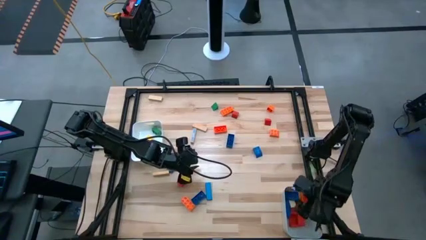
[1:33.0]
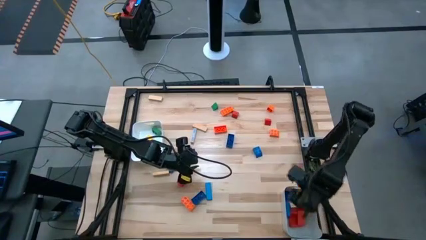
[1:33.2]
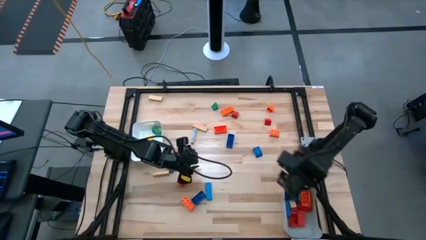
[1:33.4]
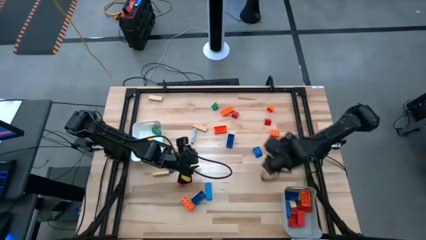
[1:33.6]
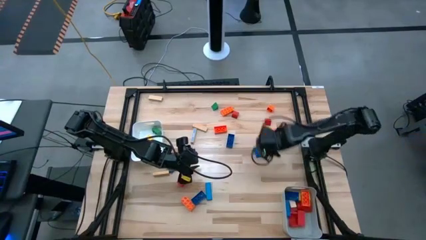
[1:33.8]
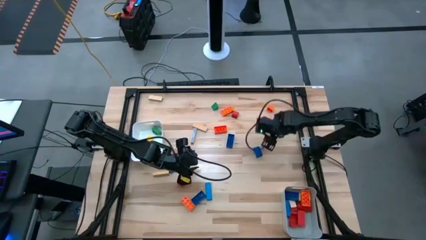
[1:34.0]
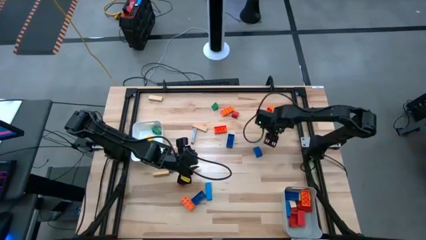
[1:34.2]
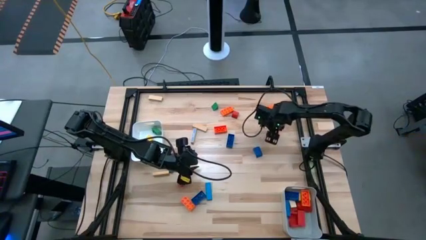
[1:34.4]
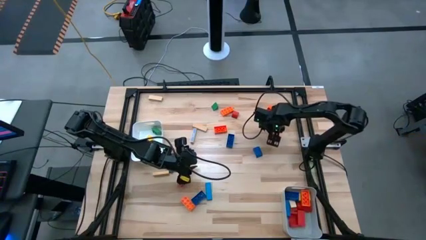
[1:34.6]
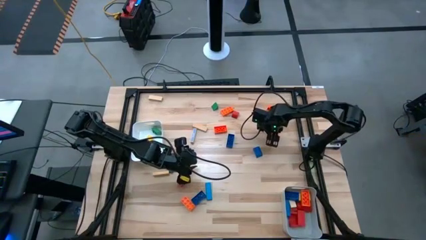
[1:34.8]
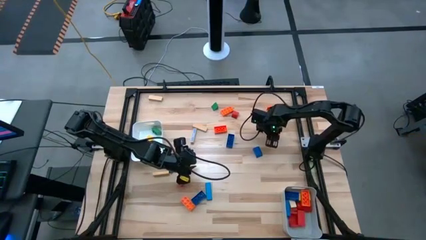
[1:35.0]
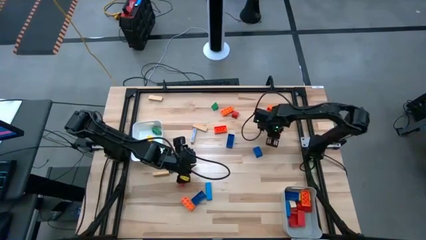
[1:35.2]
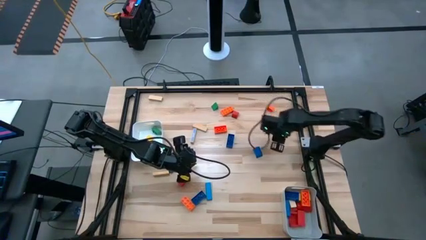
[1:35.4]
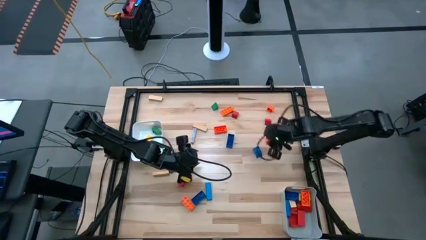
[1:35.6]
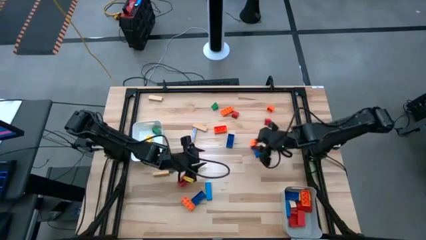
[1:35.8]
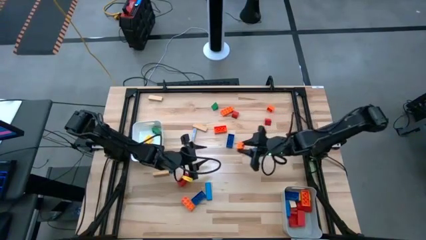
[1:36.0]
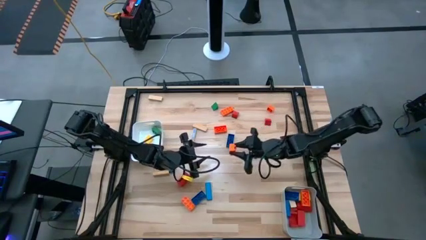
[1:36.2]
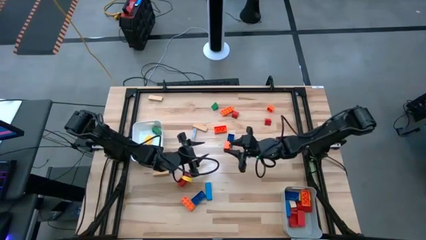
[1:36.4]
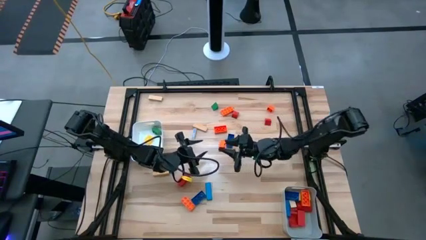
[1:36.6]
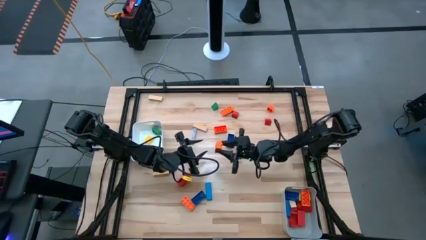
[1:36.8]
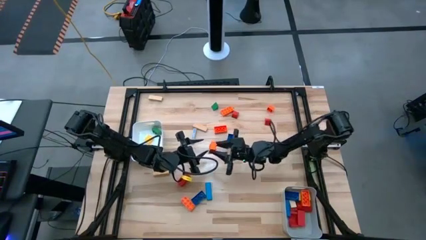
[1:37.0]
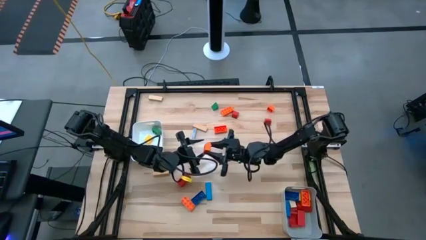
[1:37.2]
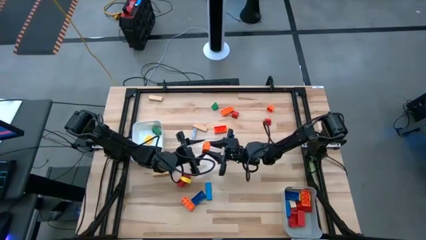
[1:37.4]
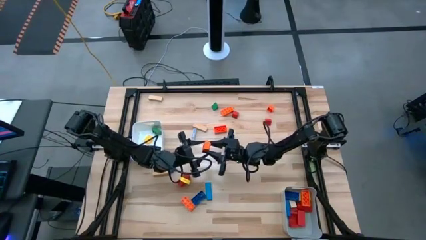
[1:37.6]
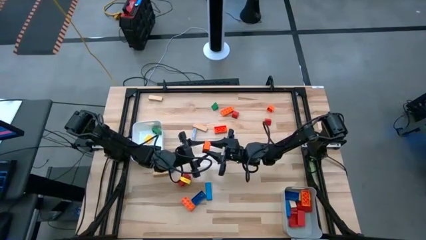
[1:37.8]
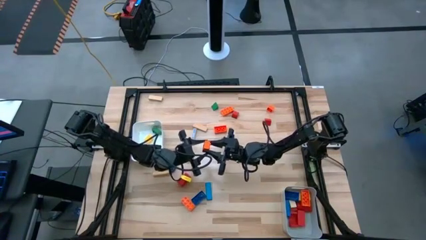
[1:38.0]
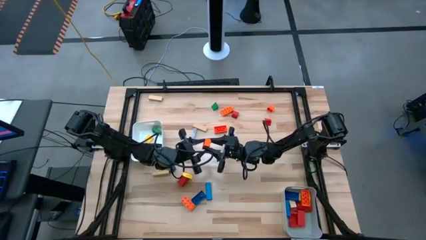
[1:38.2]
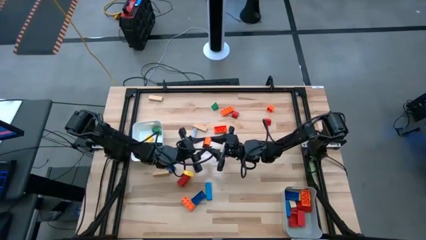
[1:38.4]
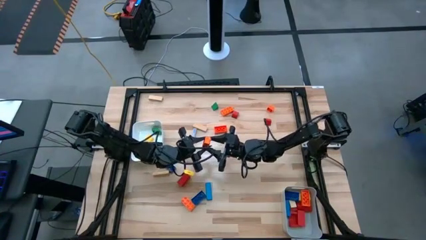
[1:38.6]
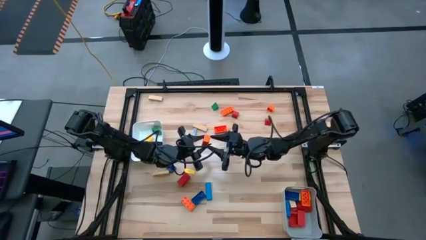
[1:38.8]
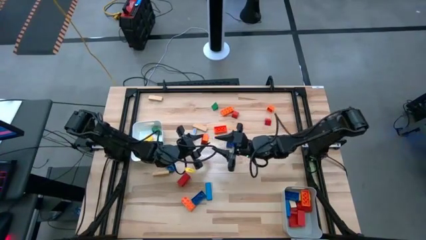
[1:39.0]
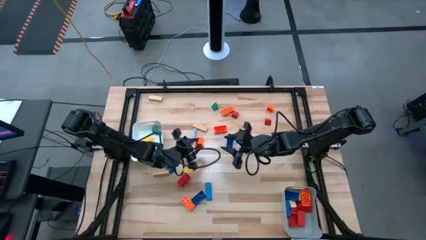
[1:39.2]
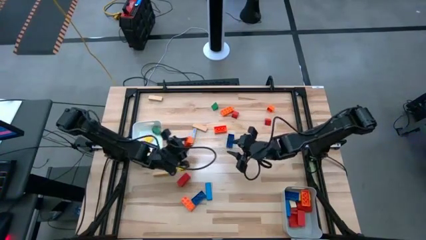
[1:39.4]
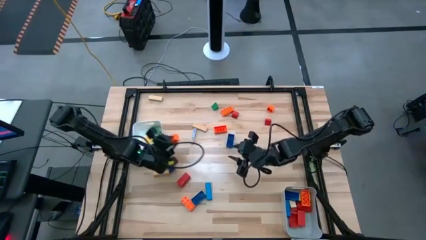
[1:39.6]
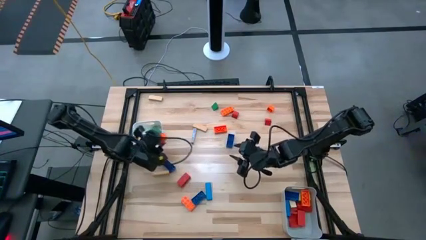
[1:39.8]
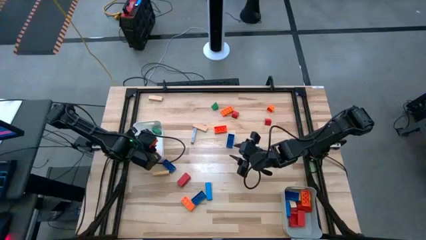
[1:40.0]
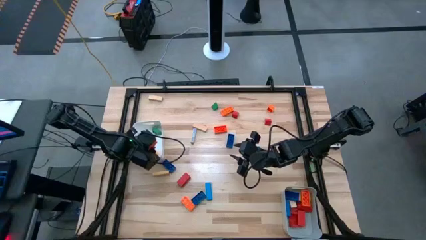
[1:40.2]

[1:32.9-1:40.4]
Task: Sort blocks by size
Put the orange small game piece into the white bin

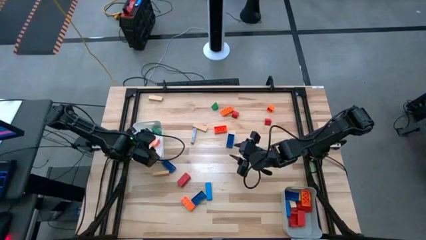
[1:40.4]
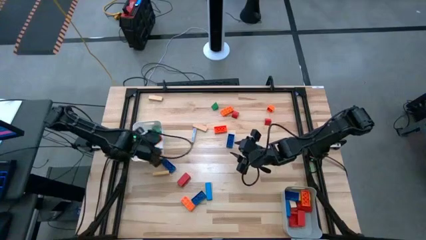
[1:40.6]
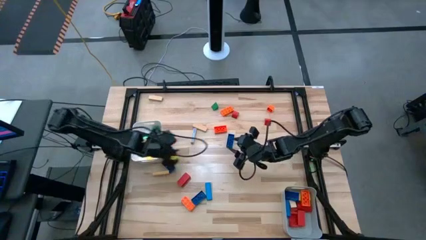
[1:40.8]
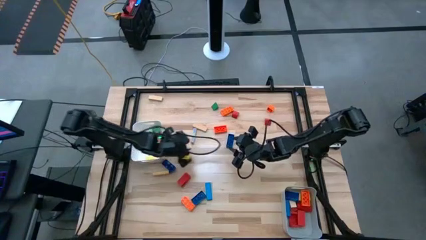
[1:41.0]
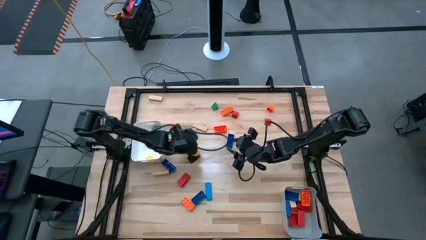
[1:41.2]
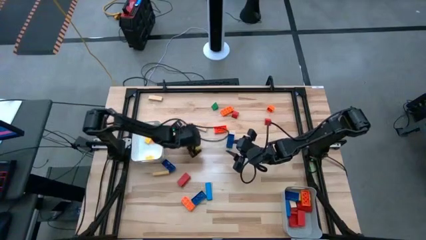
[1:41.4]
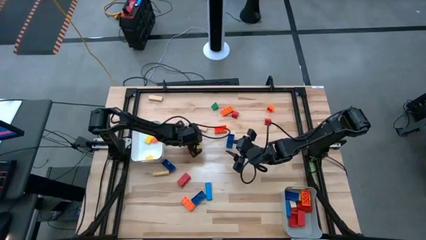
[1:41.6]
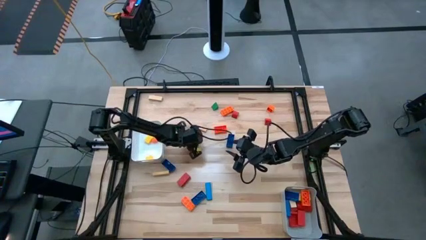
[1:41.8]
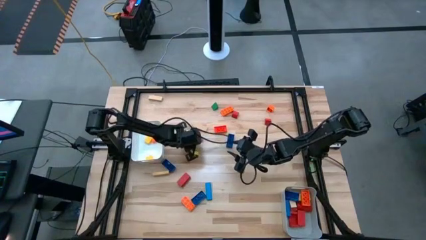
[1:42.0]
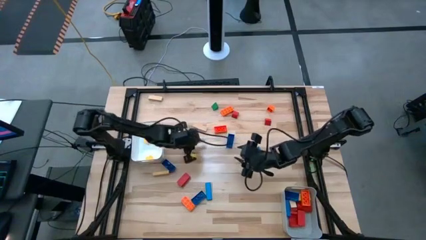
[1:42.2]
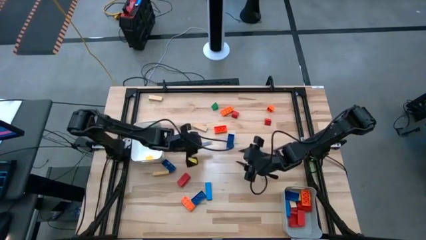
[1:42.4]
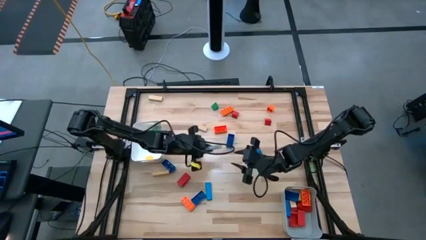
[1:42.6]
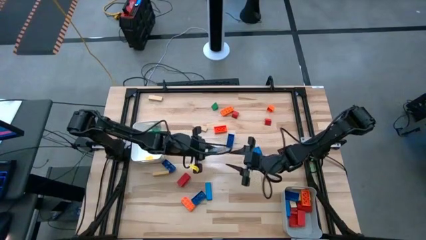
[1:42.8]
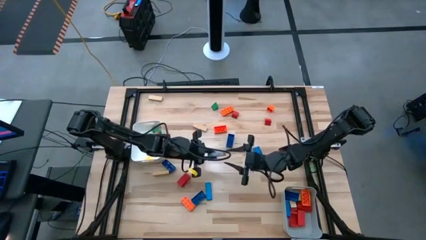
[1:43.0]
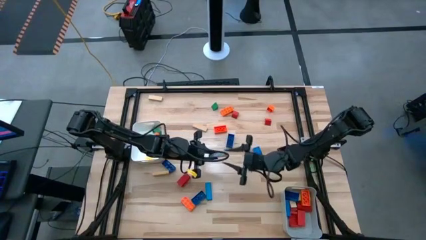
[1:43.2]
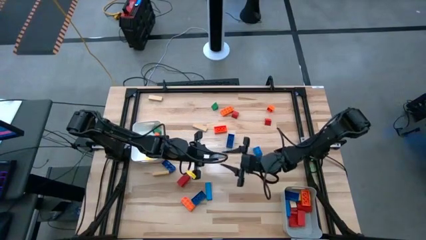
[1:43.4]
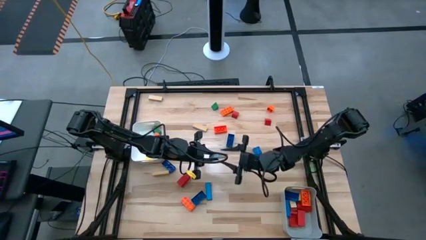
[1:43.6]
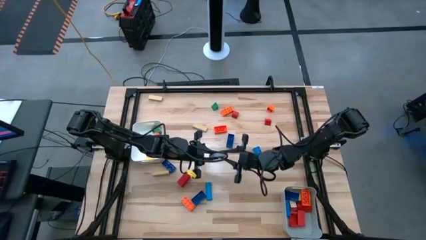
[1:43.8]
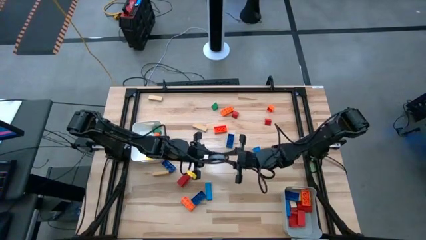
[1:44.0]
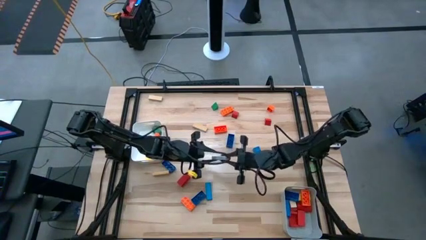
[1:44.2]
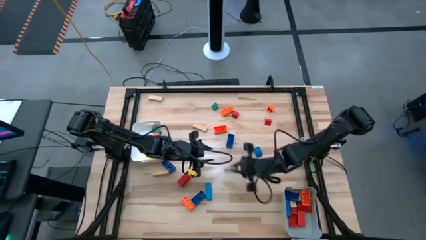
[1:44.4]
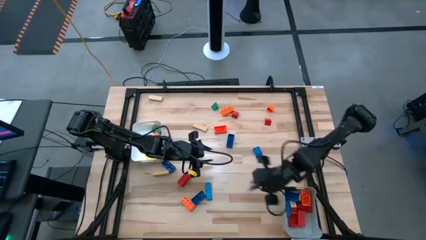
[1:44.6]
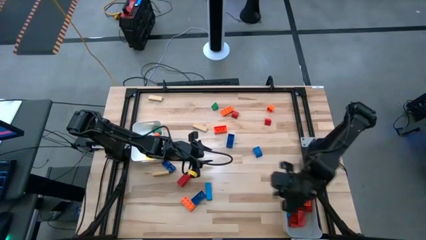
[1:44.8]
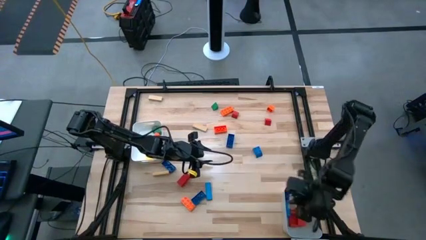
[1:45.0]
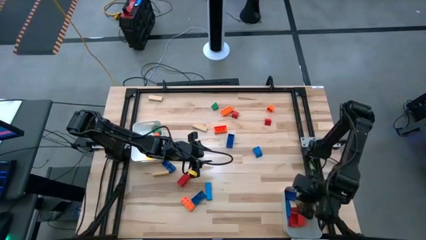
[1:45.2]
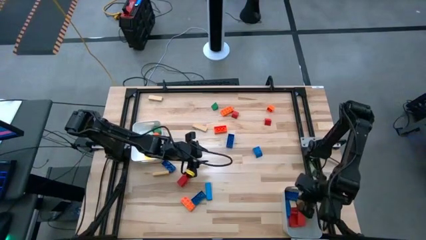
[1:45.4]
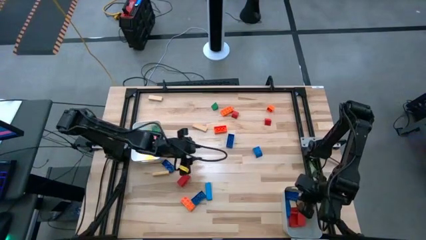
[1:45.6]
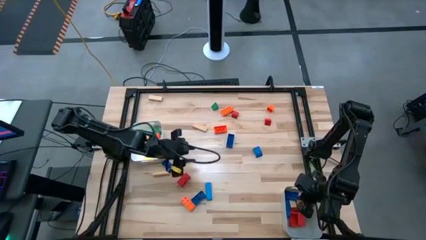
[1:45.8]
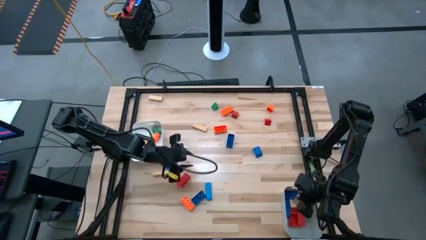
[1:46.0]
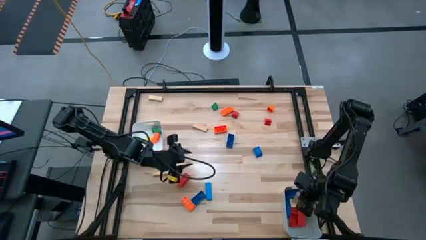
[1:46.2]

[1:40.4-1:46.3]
Put the brown large block into the gray bin

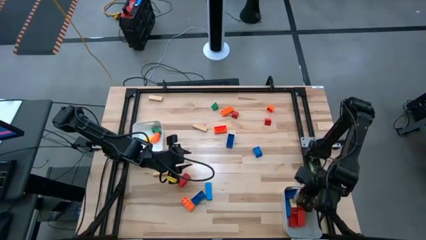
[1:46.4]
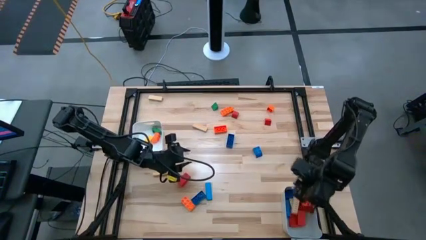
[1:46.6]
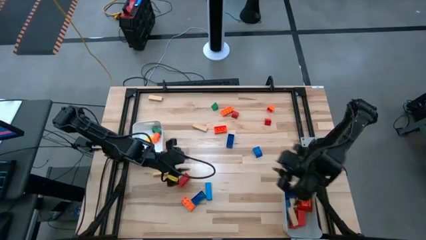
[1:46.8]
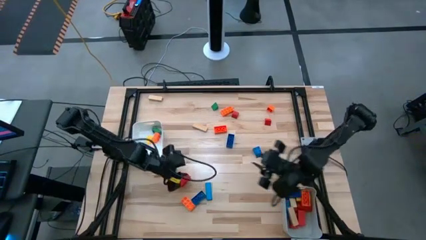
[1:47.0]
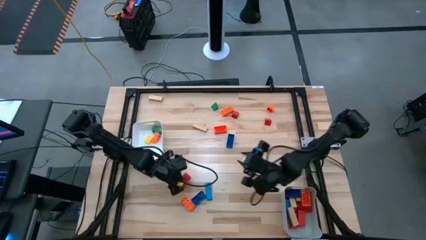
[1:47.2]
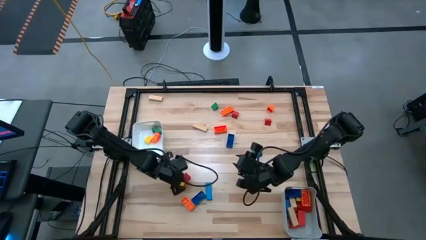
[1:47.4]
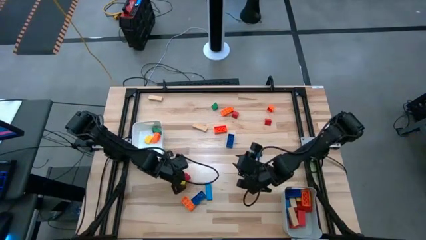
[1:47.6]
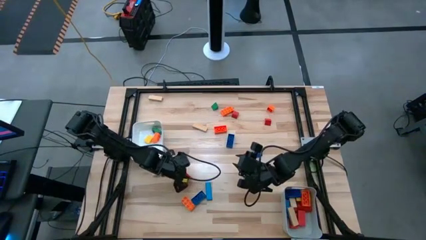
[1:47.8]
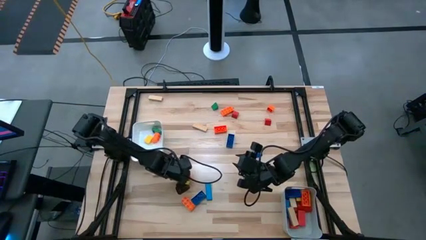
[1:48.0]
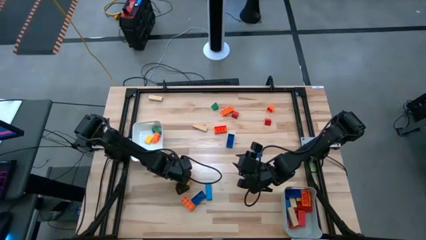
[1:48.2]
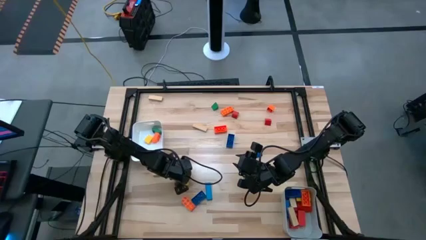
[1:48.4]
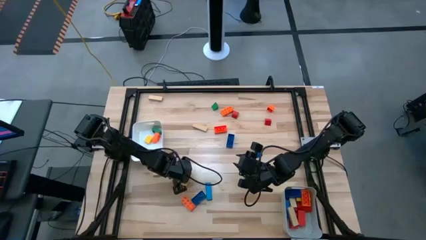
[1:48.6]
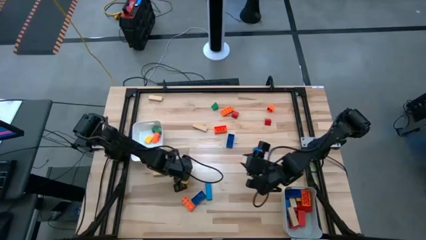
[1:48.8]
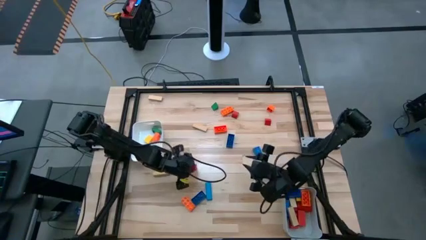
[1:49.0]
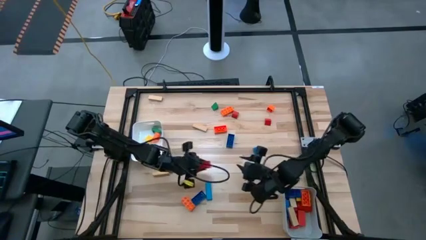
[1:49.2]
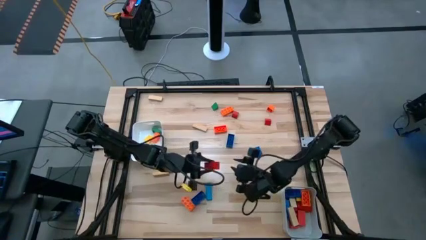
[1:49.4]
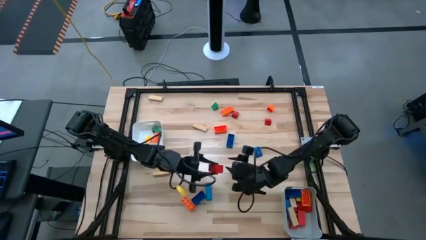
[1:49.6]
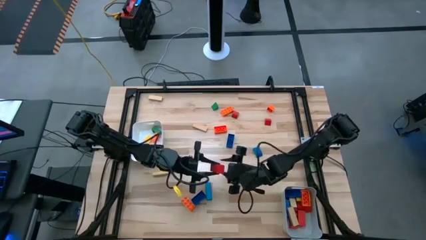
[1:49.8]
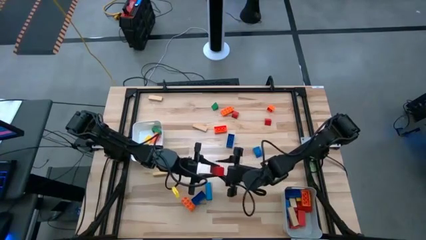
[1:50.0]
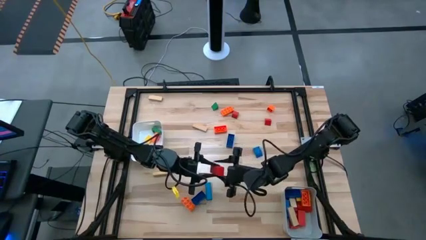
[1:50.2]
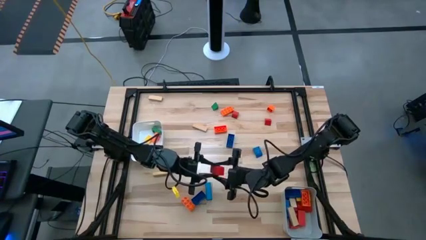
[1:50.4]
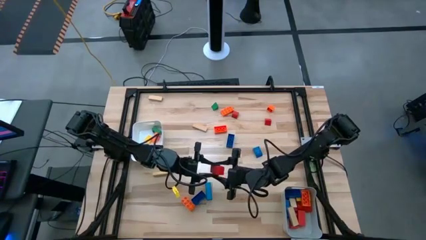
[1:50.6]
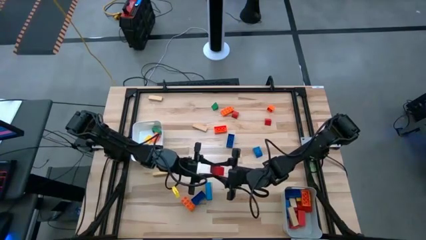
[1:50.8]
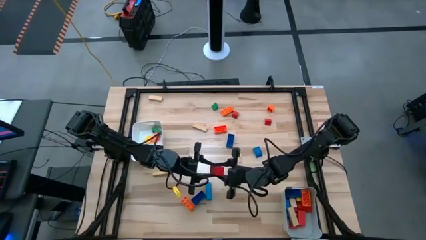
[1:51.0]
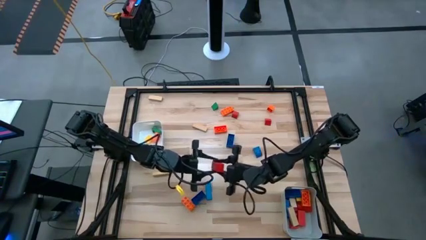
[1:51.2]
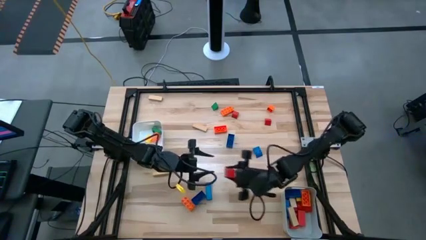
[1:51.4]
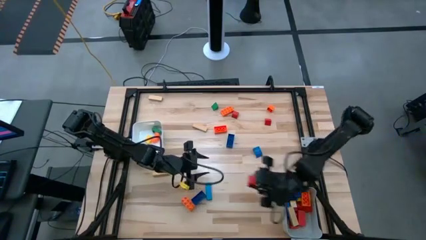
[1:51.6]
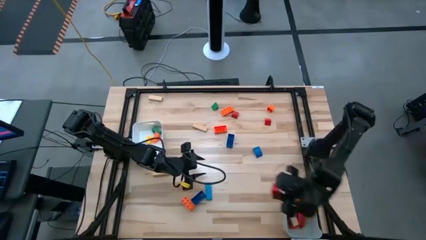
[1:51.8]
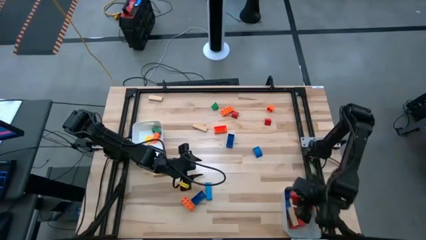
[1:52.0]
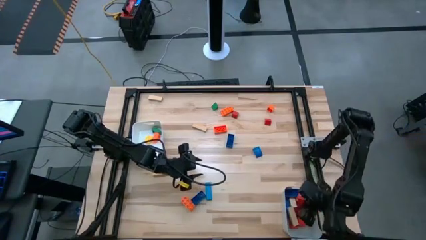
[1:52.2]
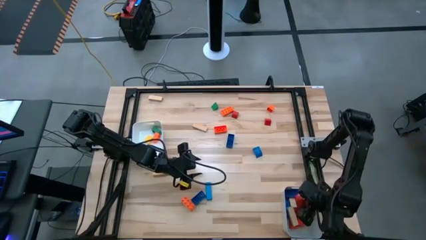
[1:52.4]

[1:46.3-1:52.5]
Put the red large block into the gray bin
